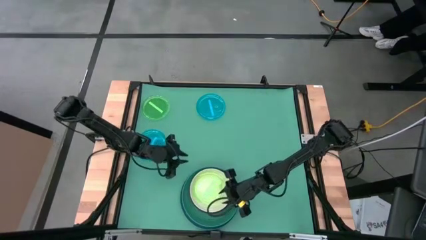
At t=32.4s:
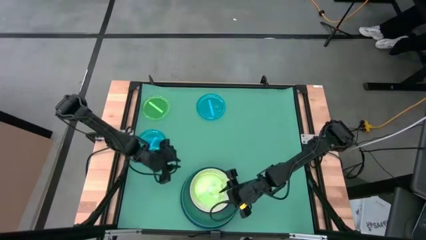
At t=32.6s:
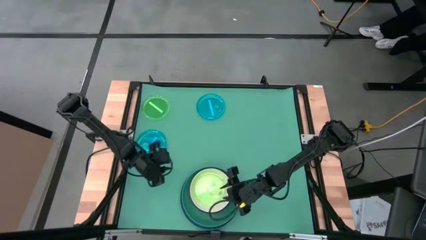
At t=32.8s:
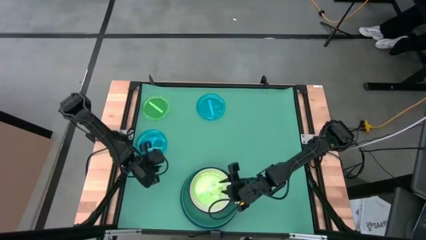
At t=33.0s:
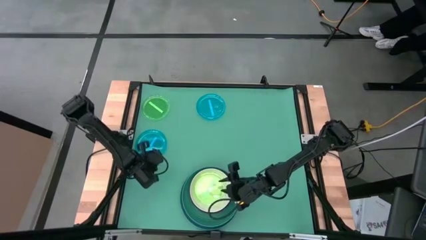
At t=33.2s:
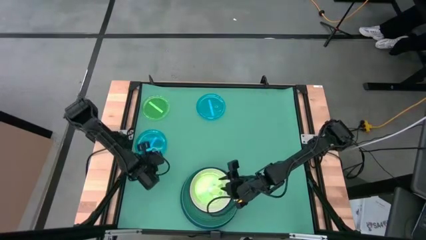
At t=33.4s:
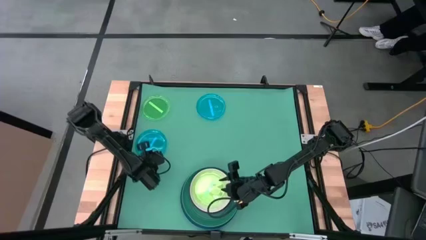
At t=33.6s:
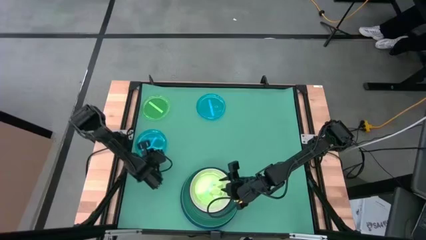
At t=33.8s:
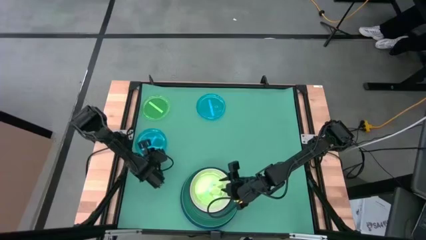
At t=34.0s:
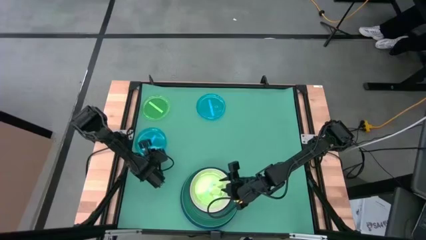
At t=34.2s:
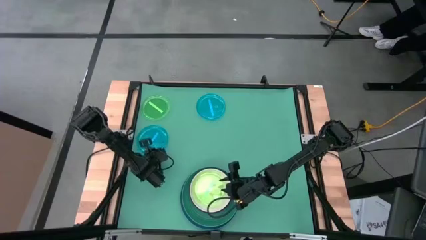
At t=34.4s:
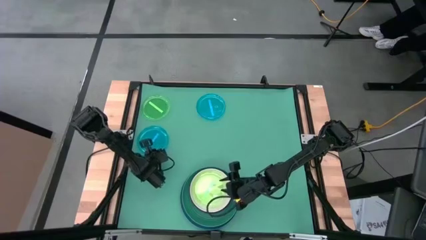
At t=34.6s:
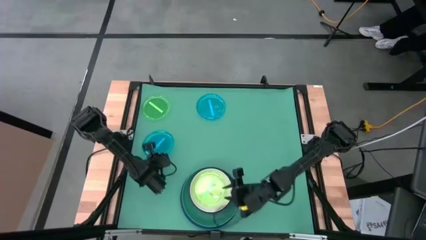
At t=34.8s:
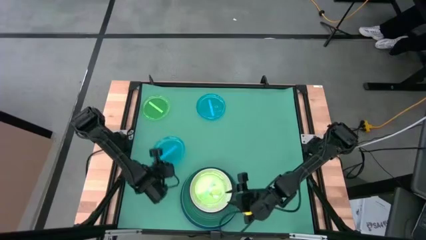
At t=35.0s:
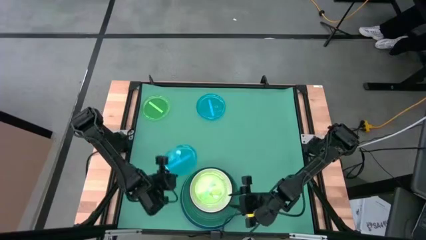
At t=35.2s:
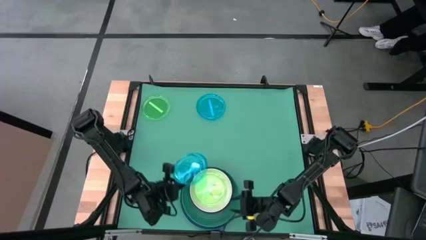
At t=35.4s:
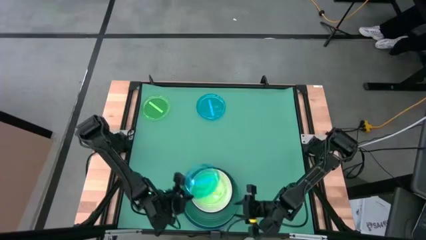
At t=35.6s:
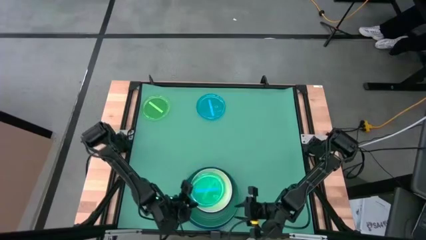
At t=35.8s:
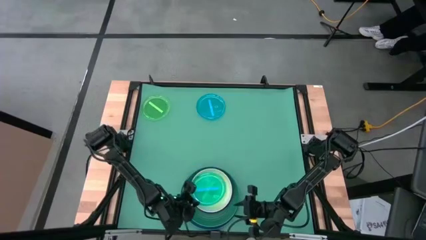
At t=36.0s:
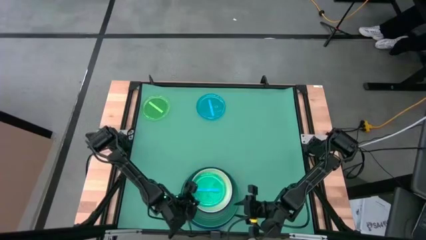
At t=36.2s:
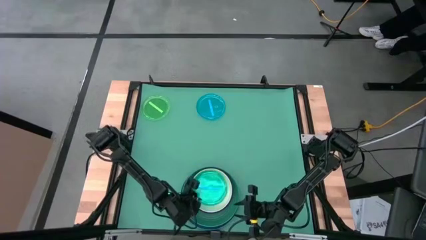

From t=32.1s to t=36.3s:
Task: Stack plastic plates
Stack the bottom light blue plate on top of the green plate

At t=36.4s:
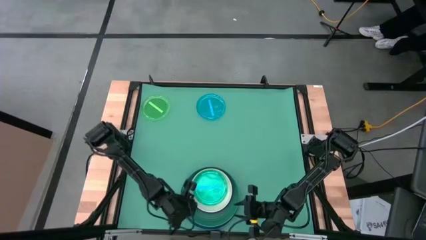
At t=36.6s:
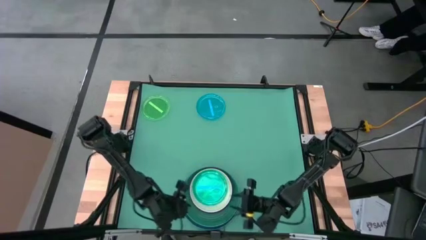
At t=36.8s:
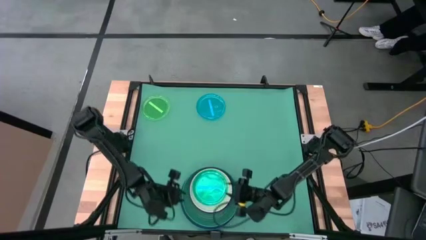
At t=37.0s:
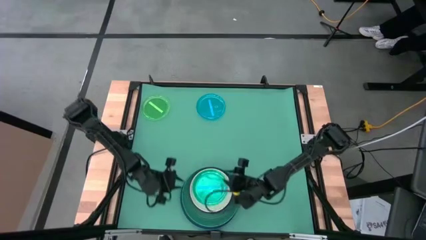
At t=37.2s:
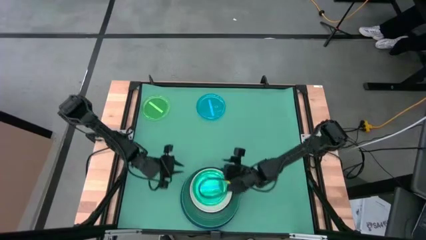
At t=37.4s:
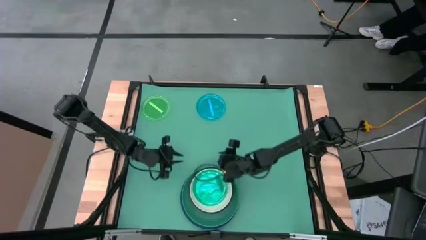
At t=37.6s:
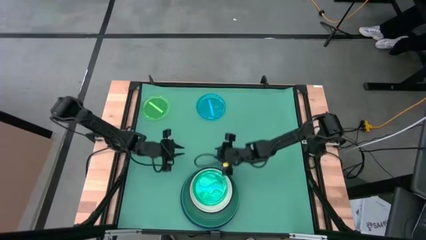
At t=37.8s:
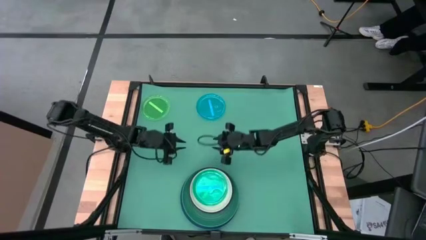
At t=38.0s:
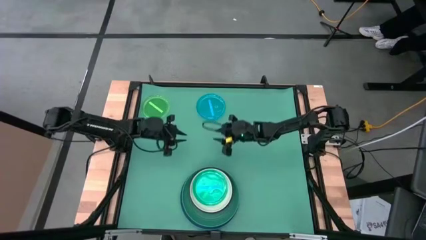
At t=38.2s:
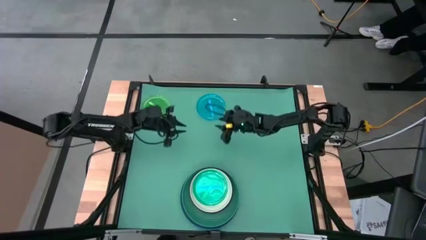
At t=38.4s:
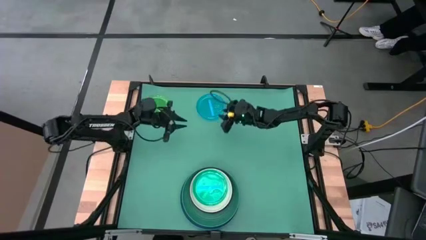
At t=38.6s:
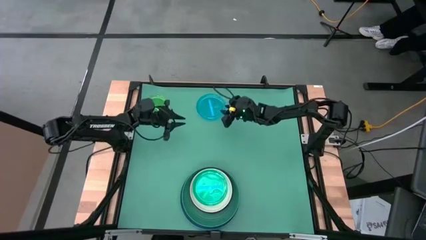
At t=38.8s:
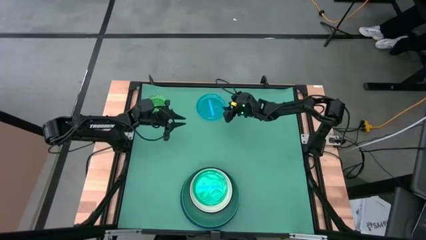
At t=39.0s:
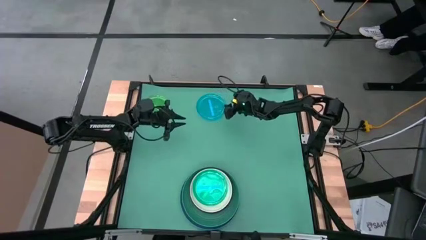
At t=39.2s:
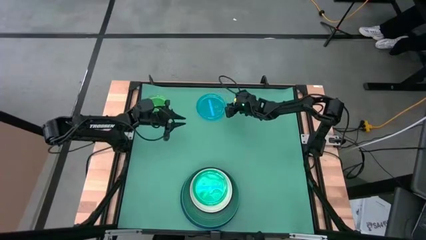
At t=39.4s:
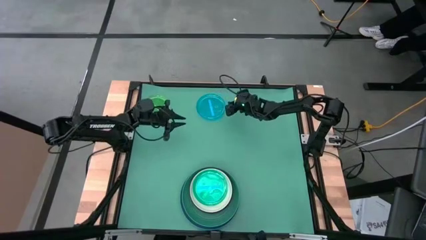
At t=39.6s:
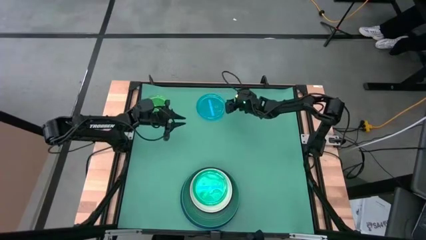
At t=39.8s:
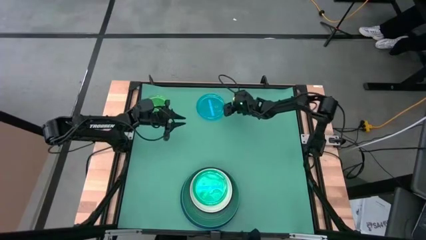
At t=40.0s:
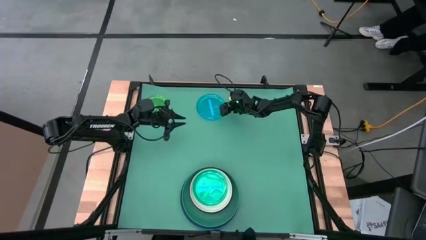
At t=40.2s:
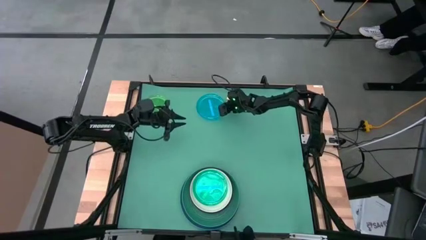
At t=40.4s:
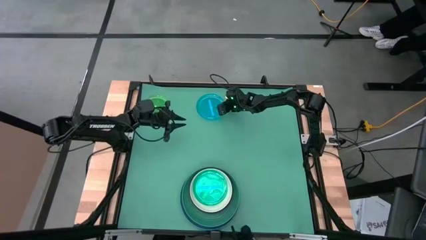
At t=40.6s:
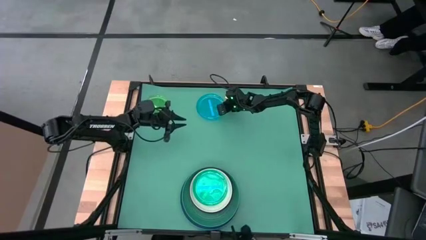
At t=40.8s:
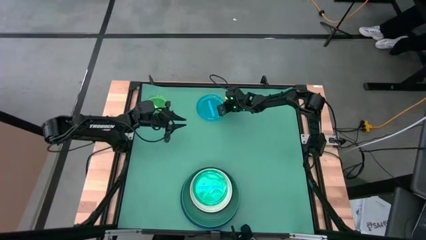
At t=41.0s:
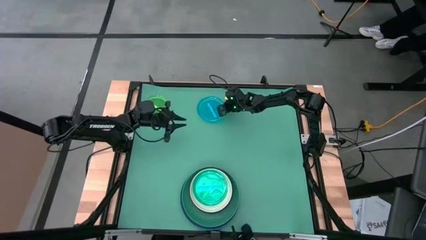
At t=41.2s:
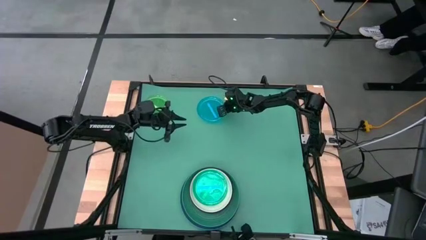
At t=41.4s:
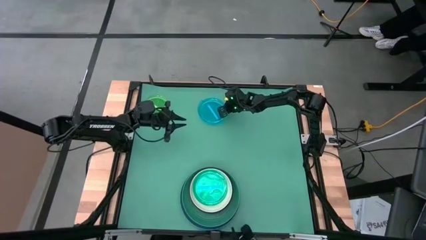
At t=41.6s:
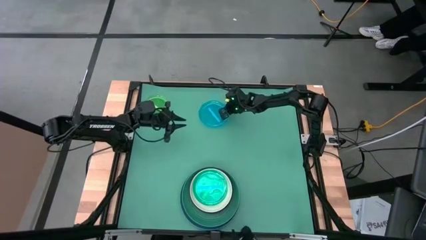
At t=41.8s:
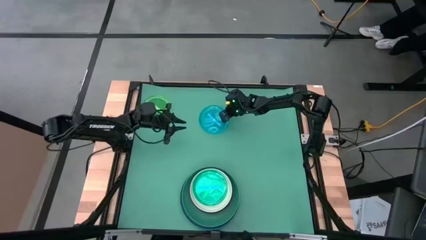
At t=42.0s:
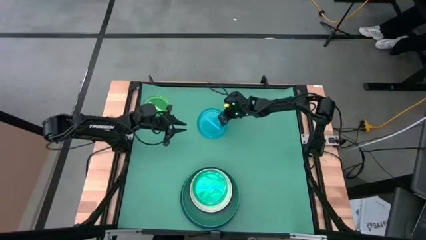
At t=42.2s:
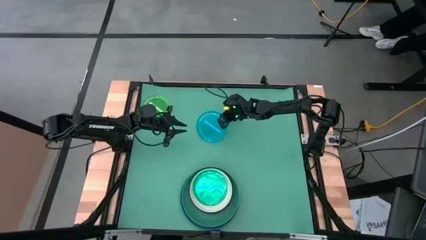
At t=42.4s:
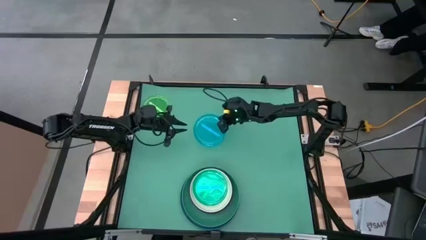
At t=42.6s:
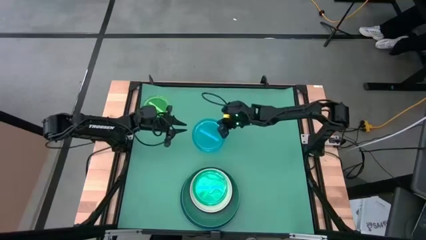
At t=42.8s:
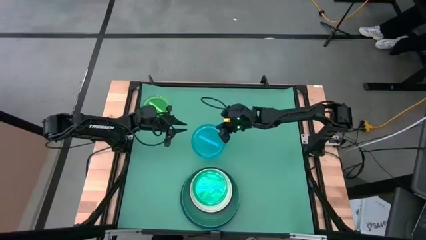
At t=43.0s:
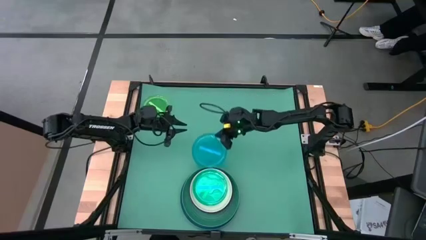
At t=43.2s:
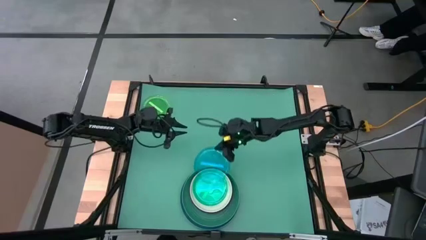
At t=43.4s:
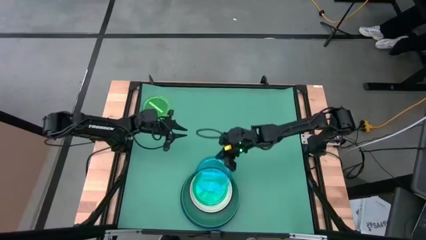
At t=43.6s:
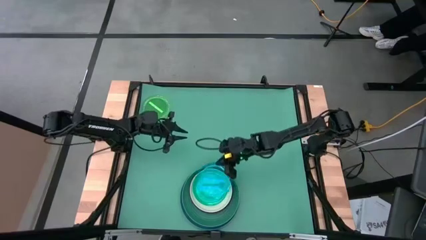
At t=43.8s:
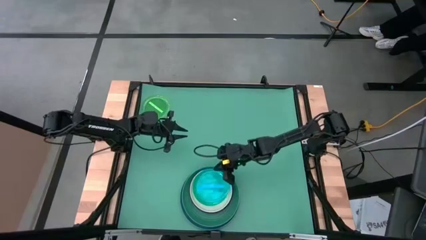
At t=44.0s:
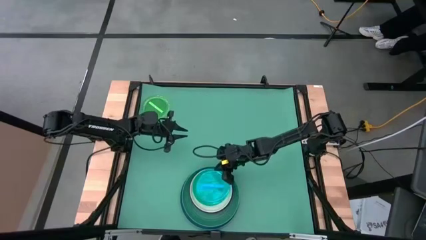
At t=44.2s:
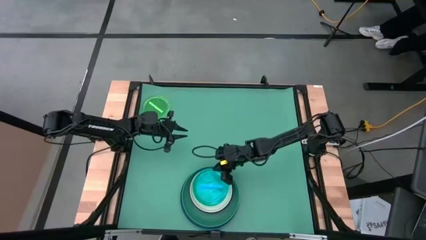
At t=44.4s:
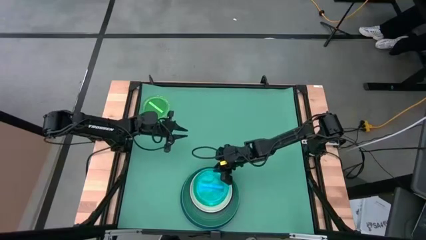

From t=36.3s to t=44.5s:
Stack the light blue plate on top of the light blue plate

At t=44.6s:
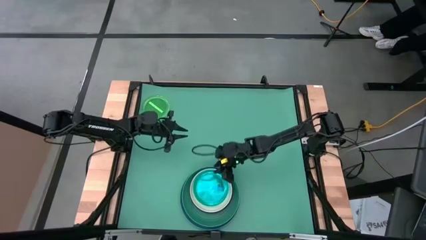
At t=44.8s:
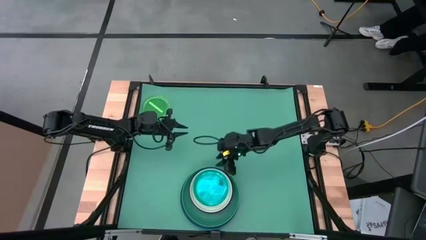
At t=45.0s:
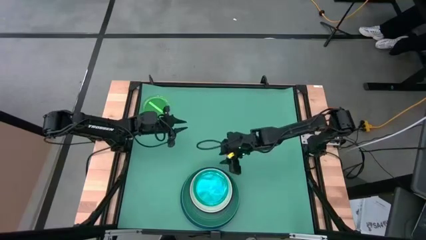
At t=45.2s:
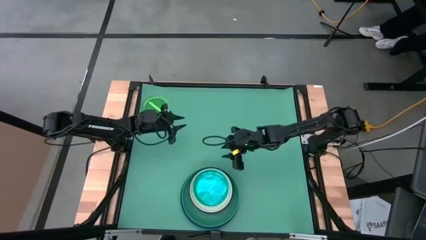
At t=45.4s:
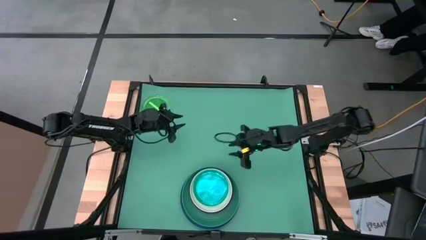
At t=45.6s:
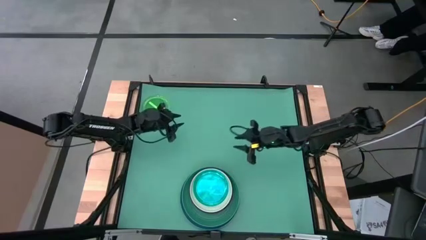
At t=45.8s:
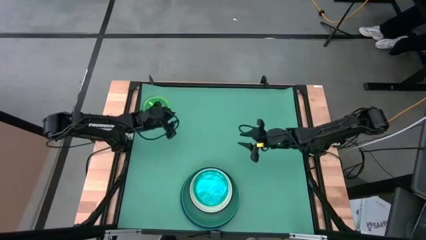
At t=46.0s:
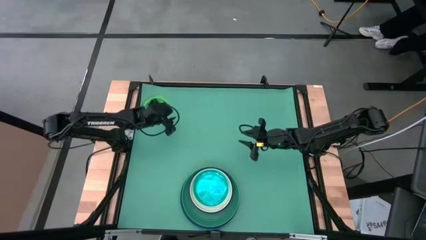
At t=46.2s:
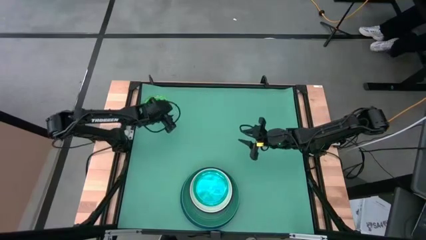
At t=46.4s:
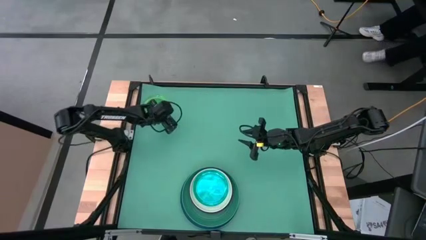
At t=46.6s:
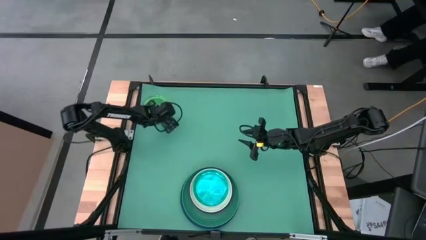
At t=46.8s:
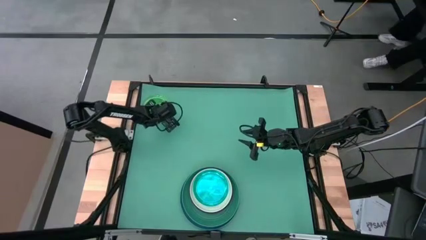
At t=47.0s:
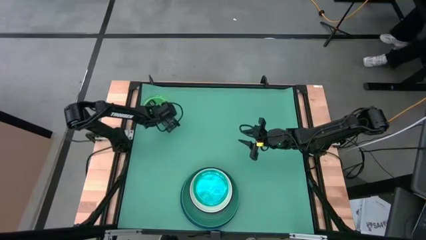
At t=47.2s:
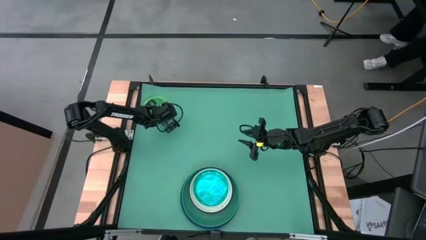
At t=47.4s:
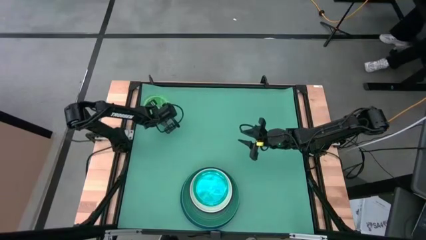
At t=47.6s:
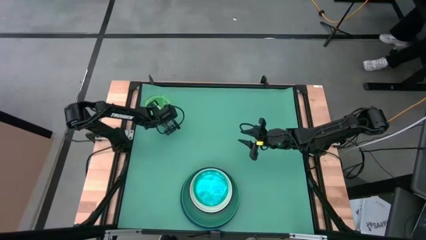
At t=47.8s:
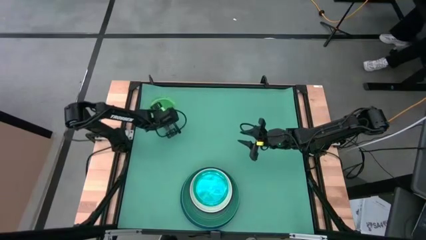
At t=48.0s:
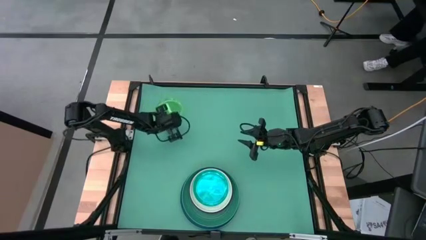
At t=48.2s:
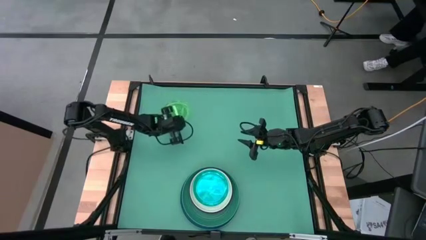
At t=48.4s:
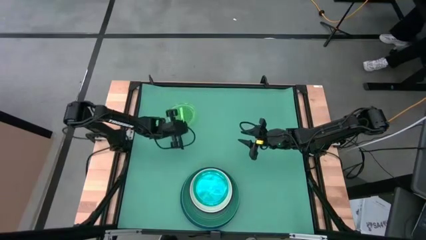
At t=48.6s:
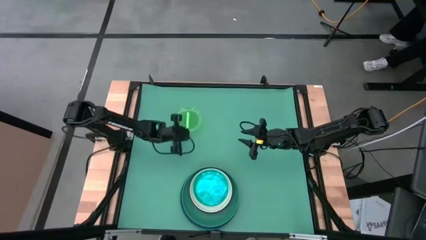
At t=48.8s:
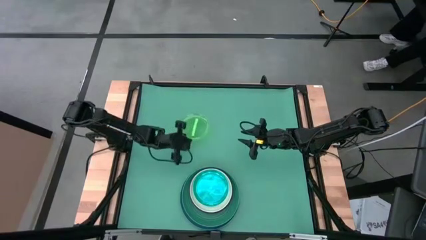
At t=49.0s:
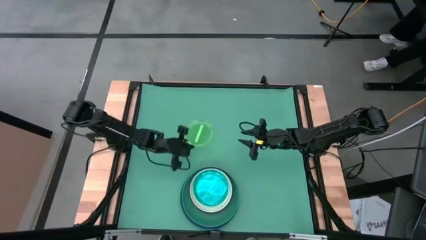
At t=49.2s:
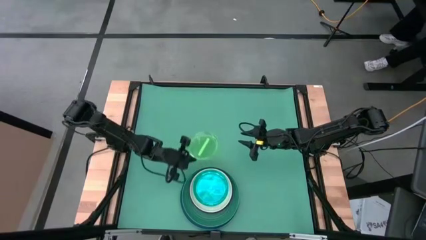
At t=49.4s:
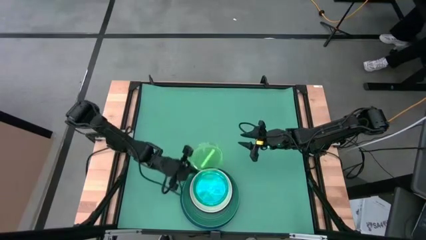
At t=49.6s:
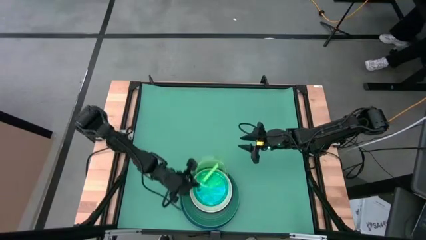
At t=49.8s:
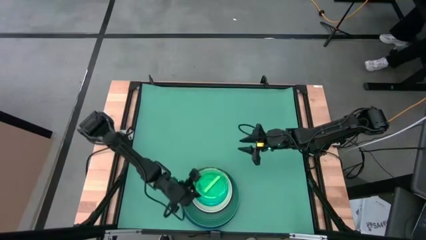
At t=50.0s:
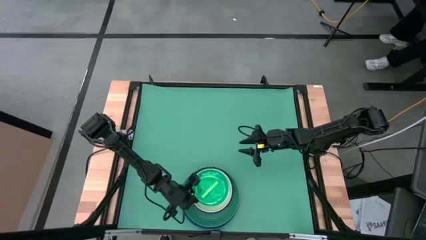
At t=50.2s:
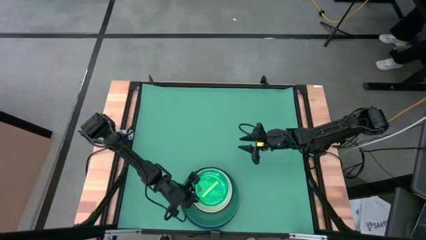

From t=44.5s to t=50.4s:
Stack the green plate on top of the light blue plate
